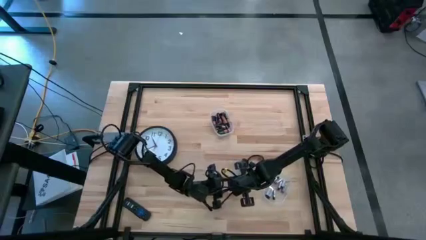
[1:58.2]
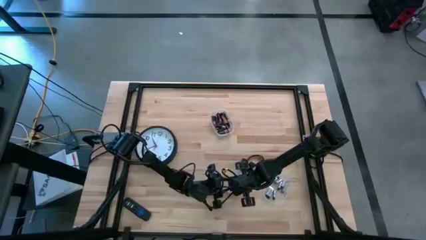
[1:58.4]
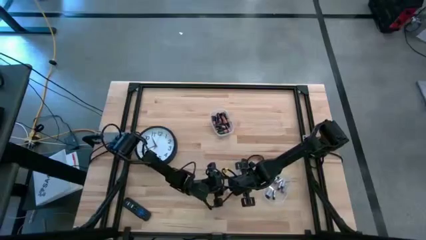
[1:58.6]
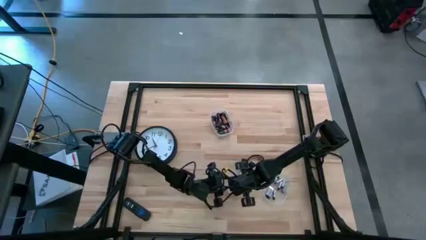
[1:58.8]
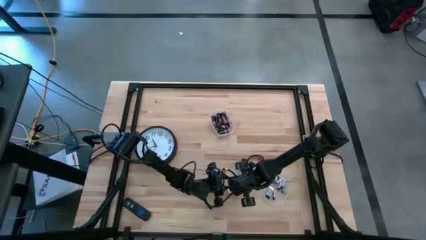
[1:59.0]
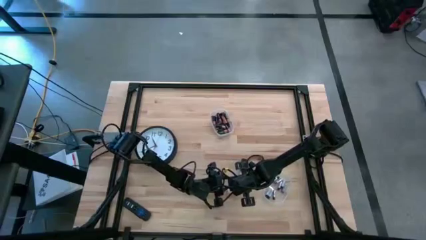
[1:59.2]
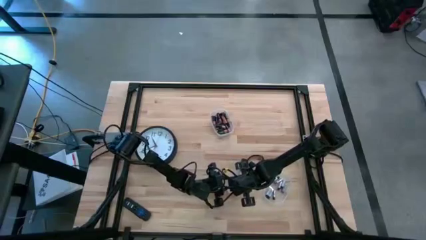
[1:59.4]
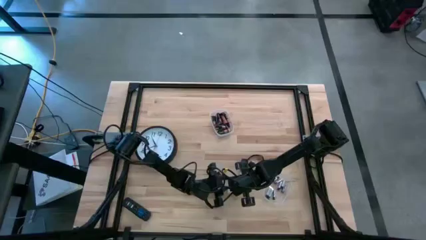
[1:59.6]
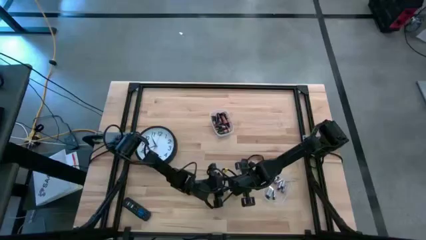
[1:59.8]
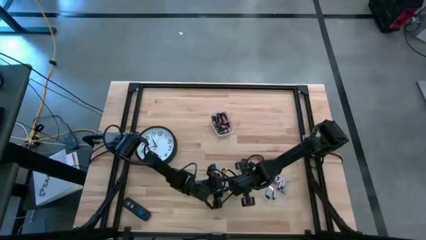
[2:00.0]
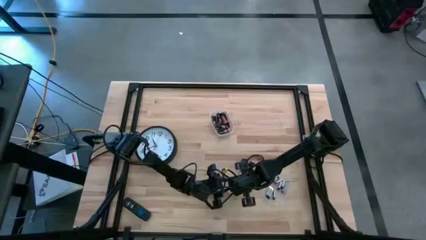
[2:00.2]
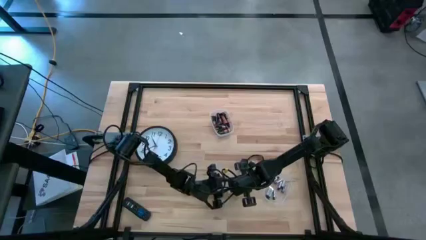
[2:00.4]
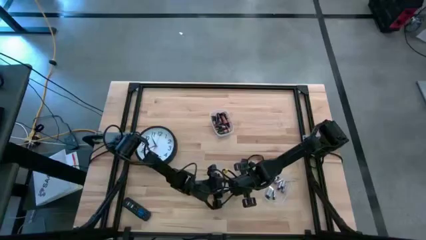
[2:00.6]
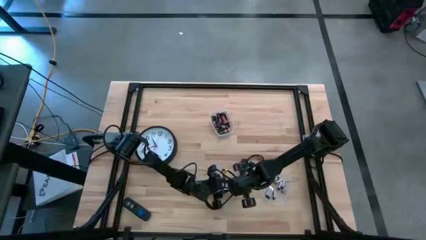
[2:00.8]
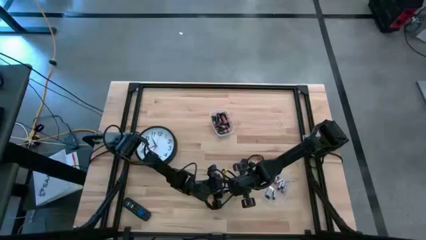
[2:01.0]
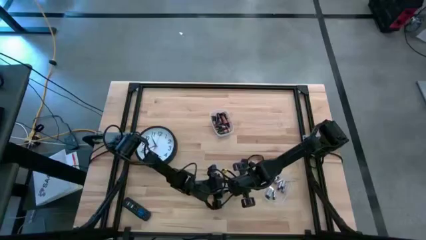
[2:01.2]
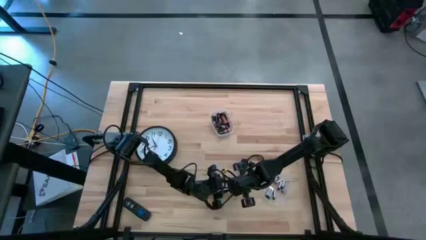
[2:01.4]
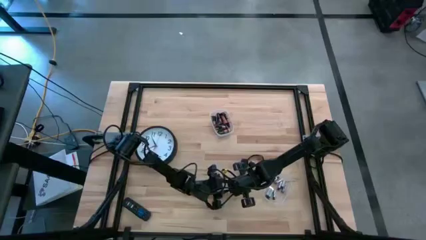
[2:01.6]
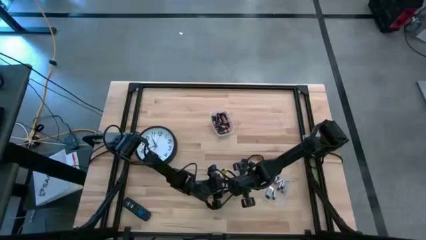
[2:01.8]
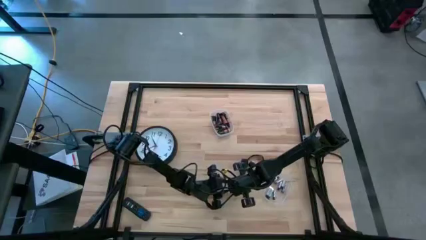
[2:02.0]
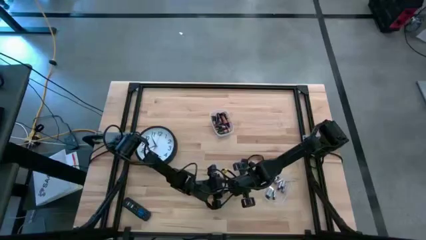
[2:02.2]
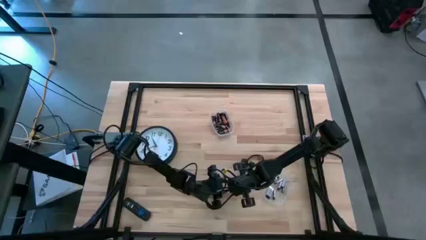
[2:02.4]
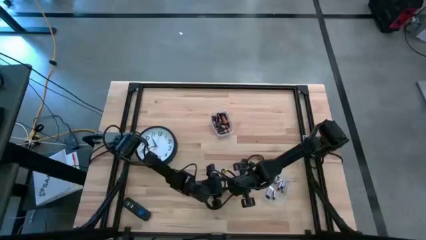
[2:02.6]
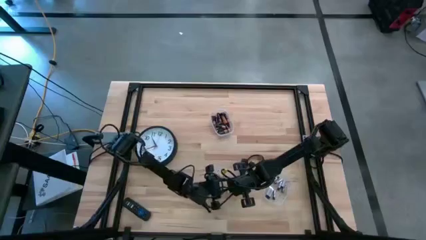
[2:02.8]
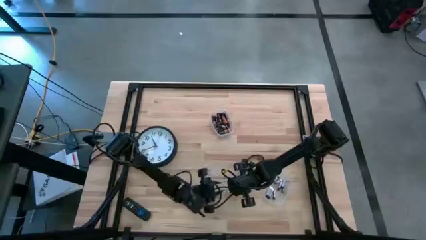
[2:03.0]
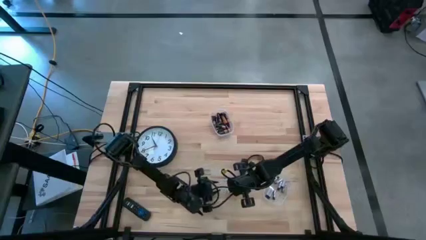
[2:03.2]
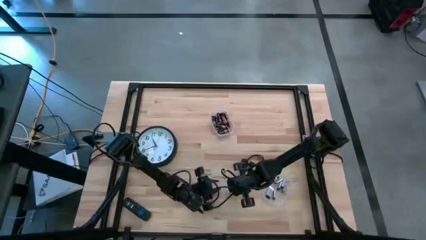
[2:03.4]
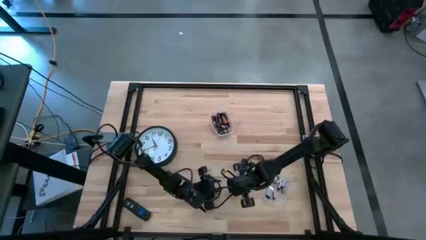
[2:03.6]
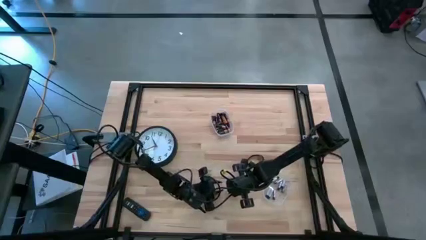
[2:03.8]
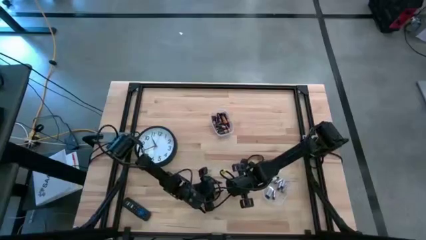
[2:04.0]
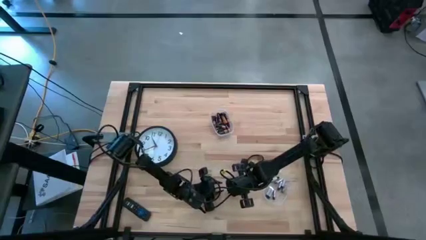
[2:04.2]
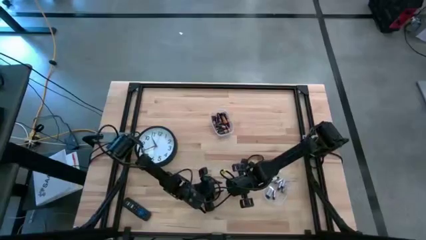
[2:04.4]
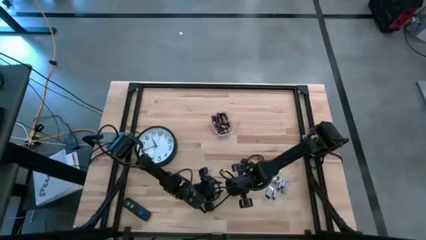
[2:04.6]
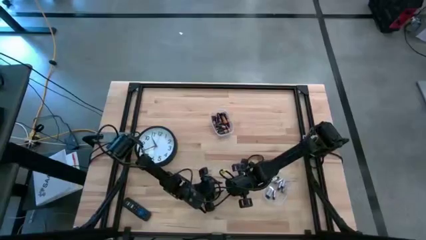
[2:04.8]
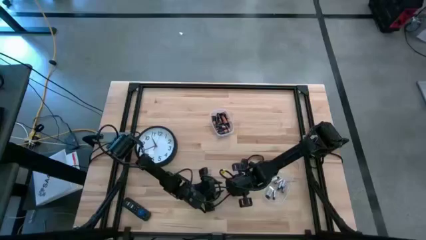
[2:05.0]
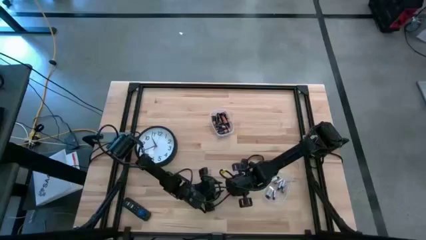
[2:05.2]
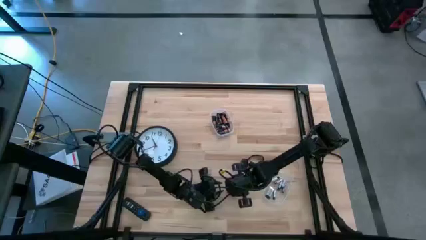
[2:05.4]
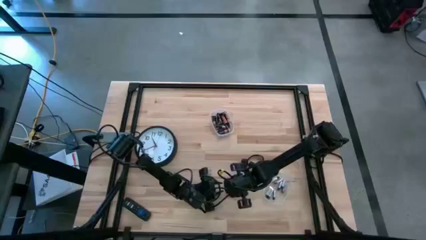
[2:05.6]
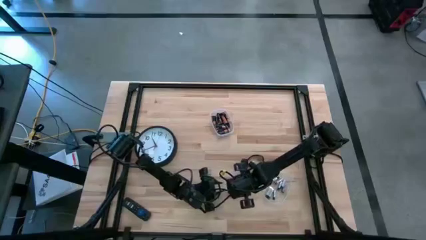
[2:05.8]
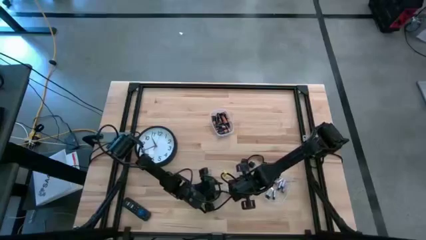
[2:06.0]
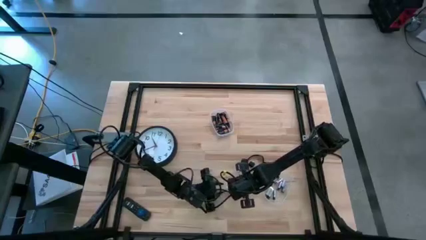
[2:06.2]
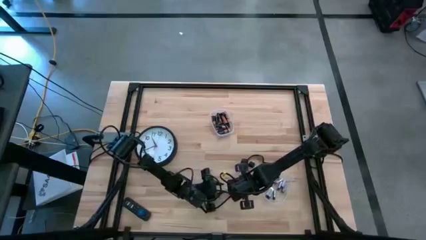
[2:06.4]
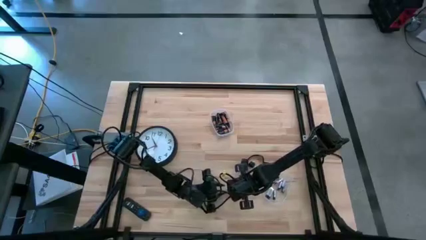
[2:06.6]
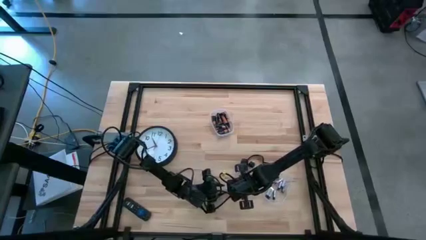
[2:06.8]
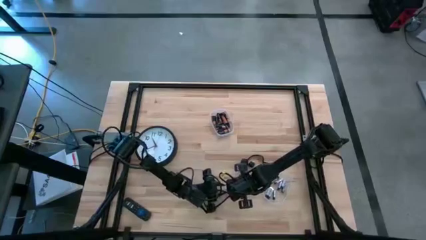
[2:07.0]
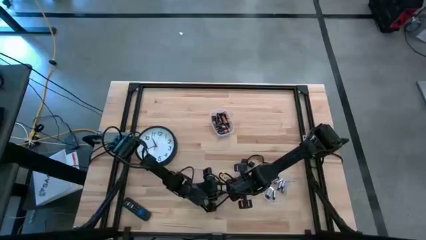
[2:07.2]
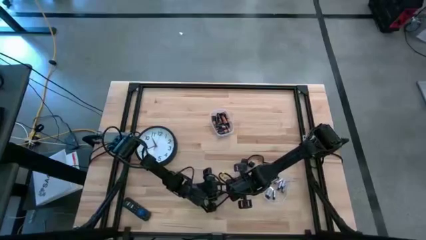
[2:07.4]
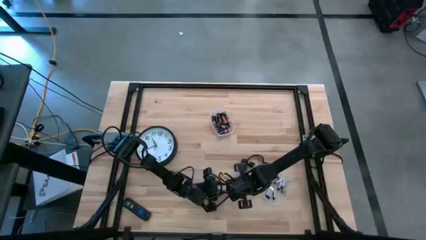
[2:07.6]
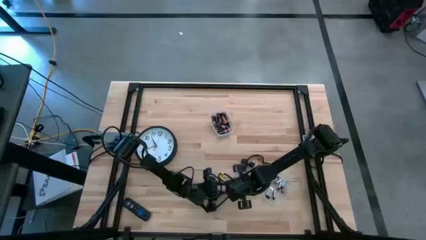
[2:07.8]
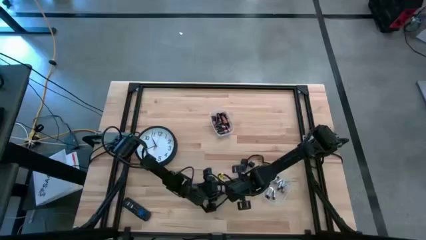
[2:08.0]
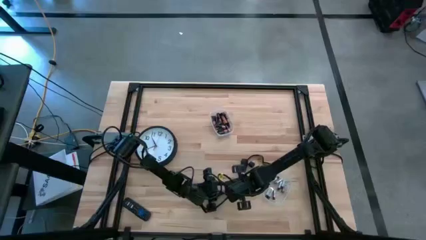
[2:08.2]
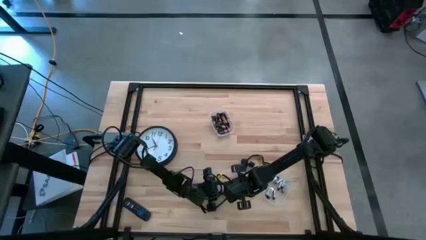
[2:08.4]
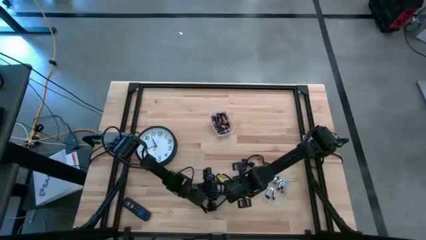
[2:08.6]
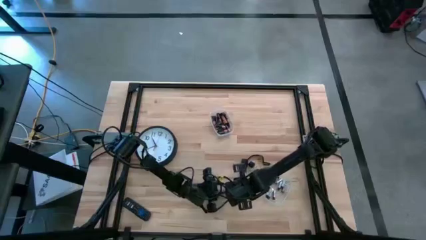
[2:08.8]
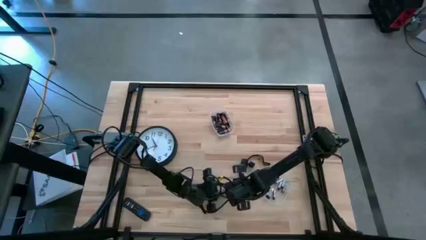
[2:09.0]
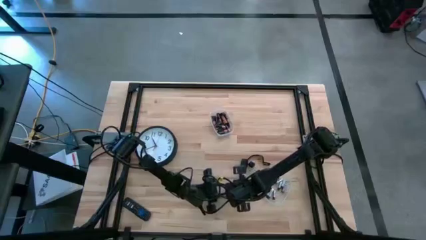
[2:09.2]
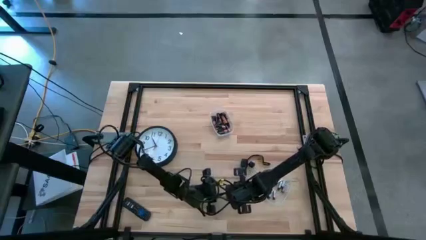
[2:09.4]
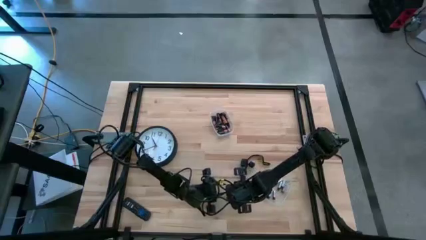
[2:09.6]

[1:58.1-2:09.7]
Task: Insert battery
Insert the silver battery into the battery holder

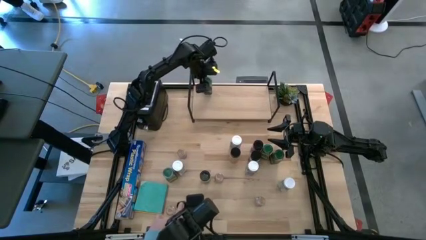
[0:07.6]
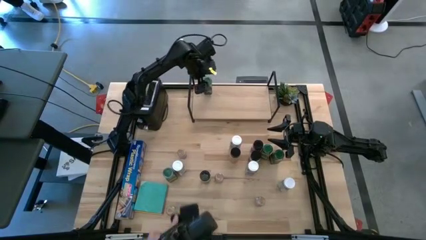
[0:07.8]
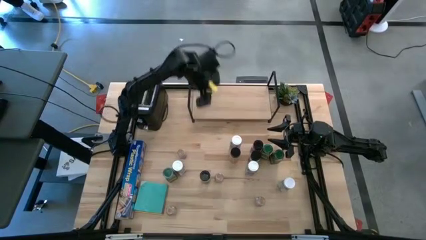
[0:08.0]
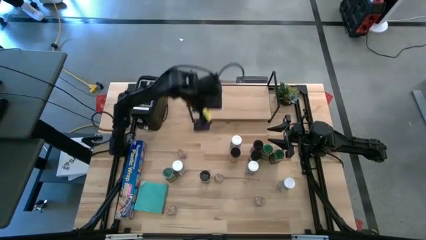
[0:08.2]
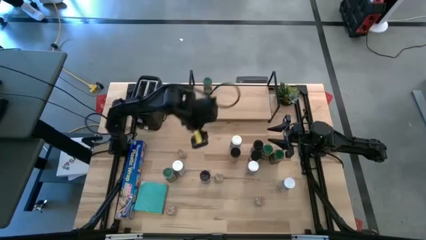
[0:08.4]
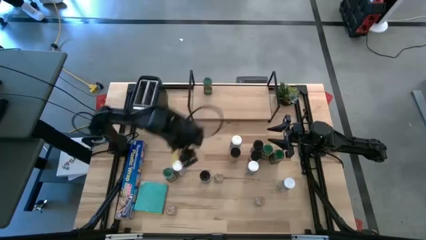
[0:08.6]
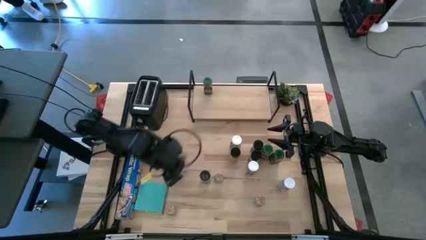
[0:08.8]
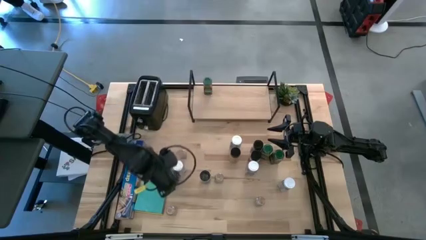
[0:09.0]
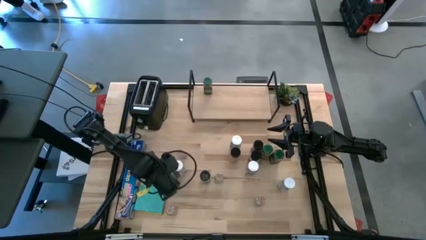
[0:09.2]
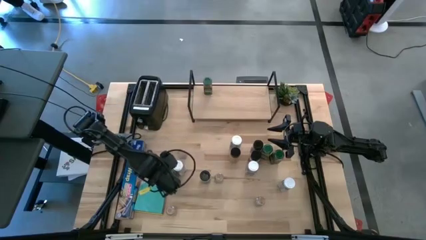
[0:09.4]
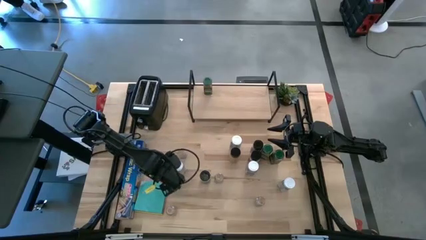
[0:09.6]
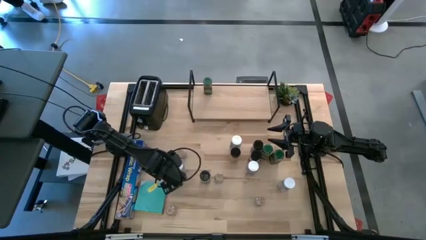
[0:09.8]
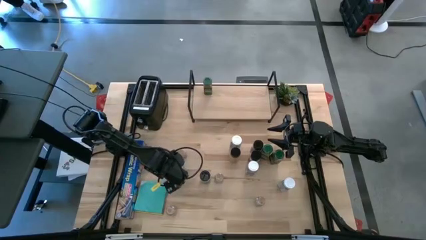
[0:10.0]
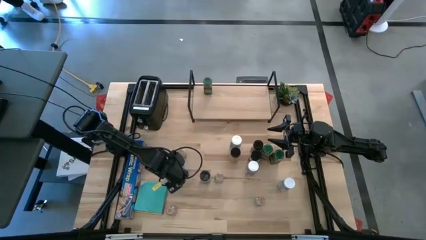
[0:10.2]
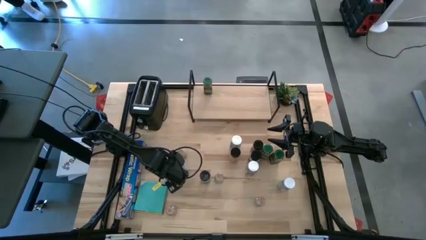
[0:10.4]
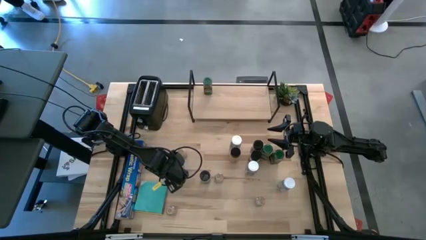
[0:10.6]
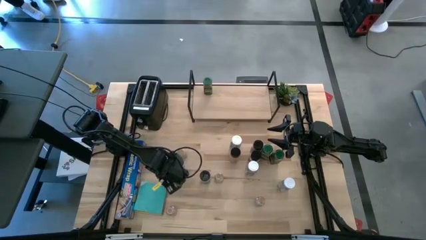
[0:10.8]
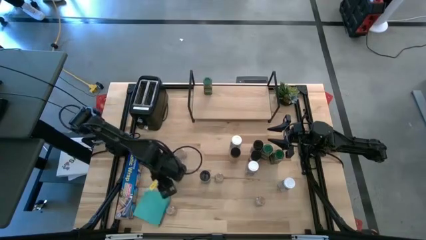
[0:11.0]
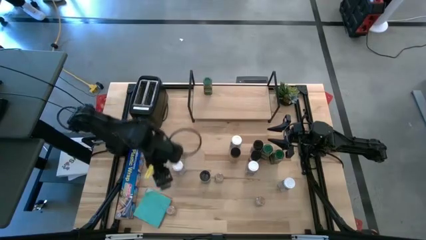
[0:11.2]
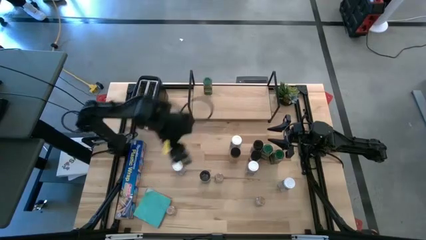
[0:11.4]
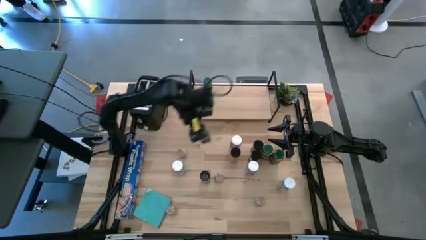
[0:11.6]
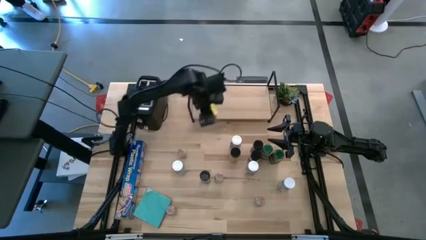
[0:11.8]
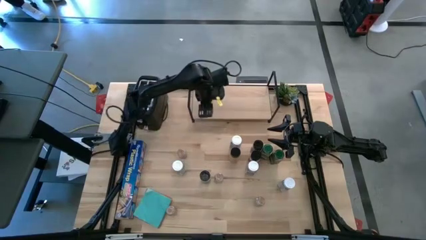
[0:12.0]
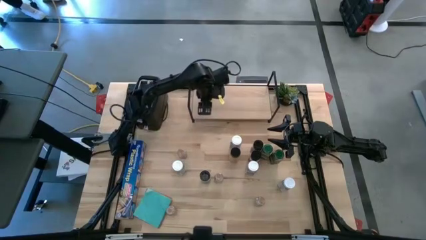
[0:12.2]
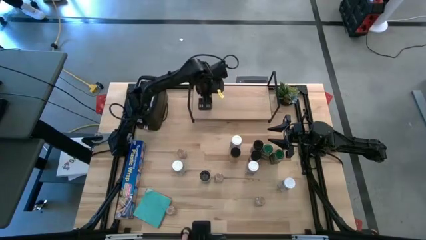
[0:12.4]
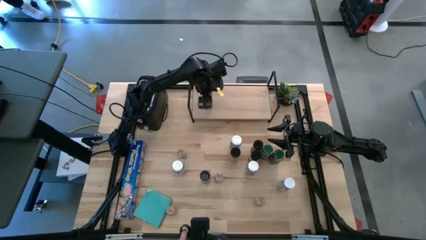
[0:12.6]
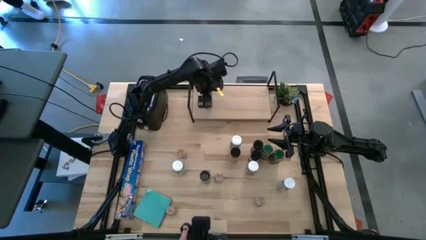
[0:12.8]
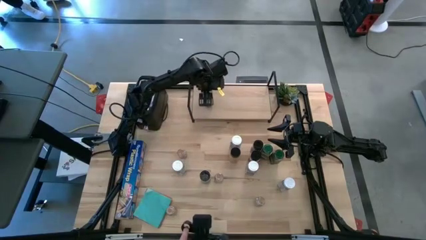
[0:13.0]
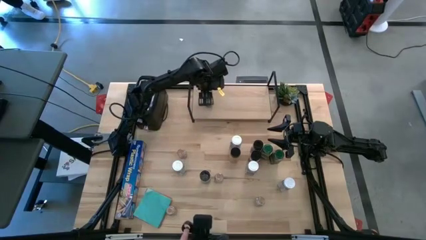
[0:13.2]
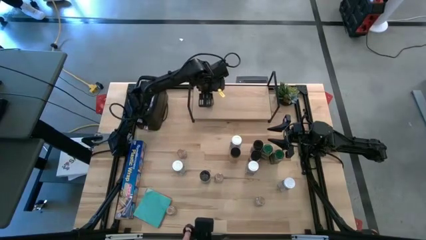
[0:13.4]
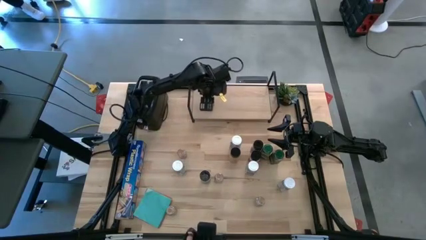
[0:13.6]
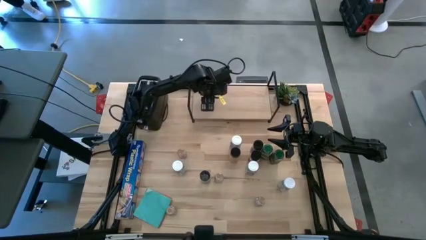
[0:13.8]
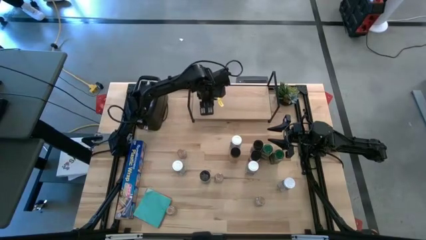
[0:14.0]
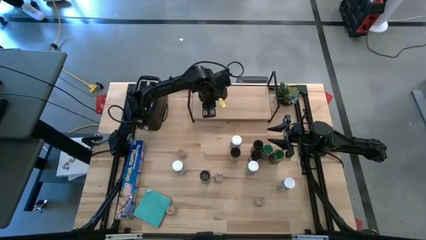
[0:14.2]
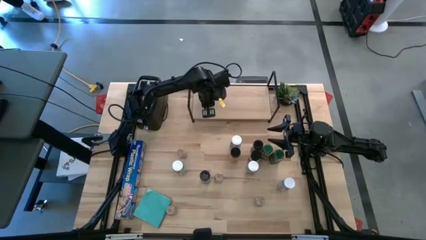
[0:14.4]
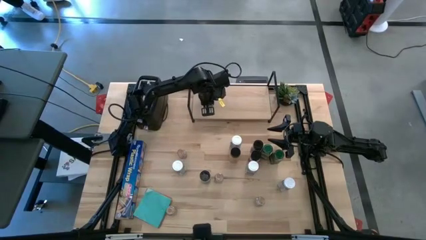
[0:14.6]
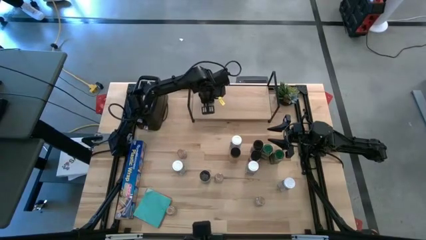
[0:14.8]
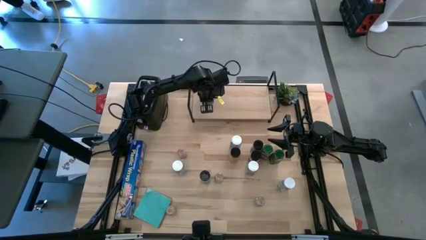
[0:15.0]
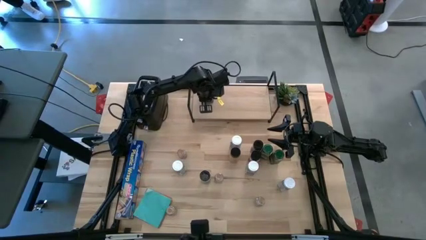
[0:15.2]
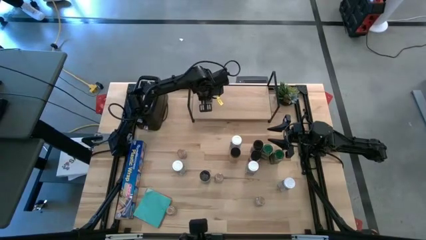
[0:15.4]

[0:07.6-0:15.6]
Task: Shelf spices
Put the bottom left green seasoning bottle on the shelf aligned with the other green seasoning bottle
